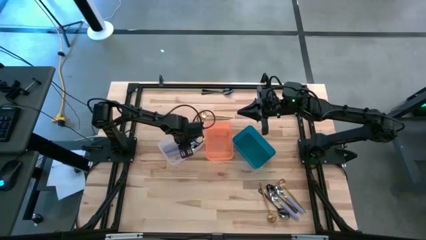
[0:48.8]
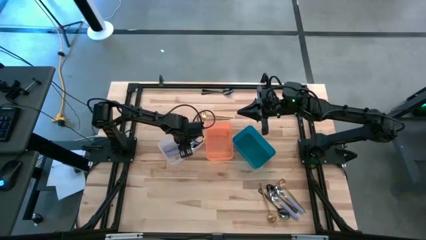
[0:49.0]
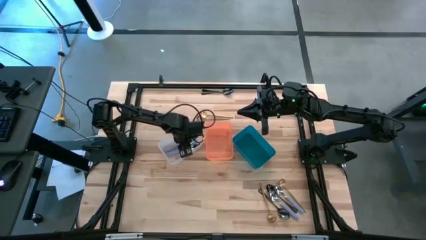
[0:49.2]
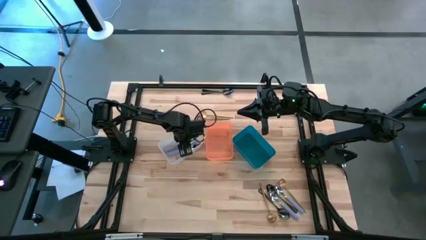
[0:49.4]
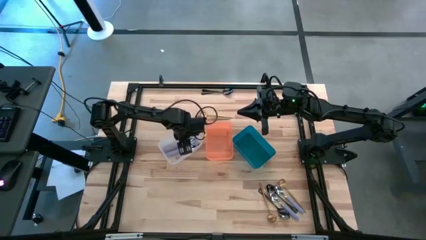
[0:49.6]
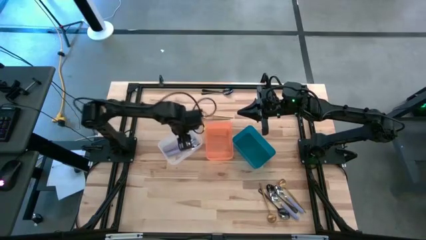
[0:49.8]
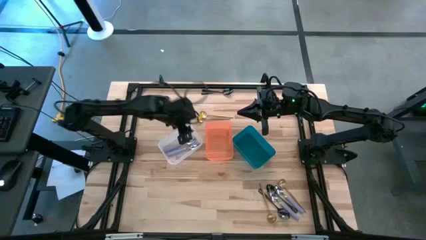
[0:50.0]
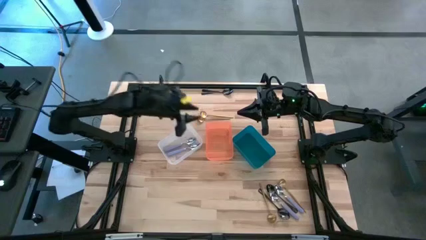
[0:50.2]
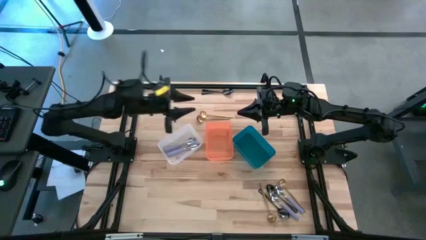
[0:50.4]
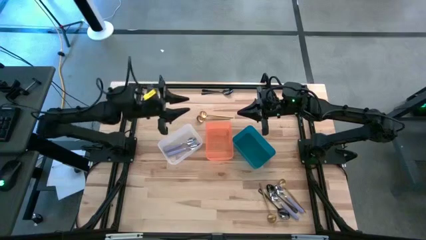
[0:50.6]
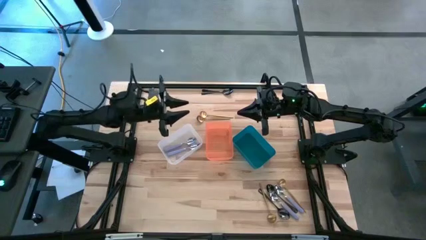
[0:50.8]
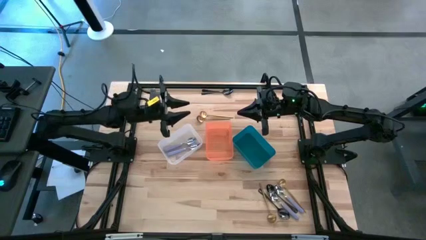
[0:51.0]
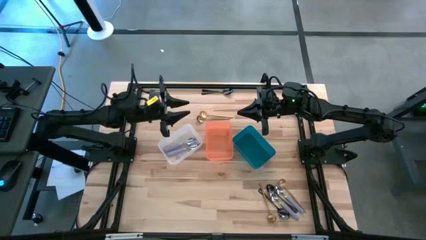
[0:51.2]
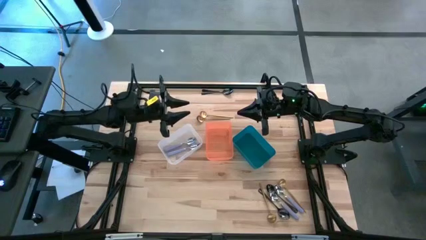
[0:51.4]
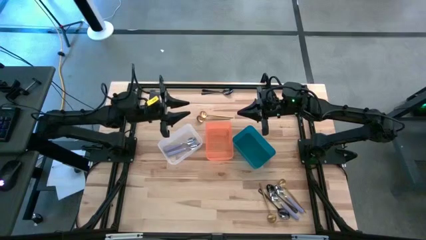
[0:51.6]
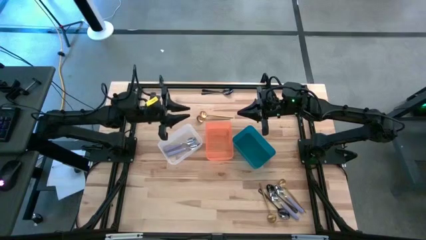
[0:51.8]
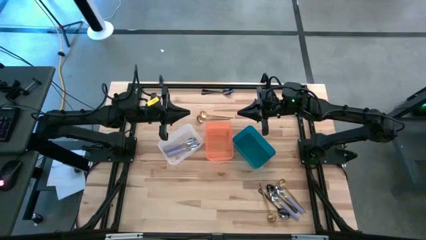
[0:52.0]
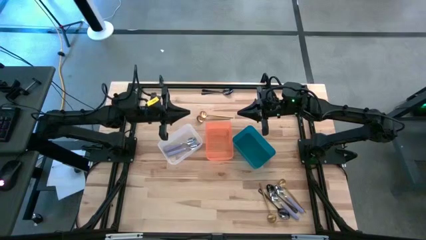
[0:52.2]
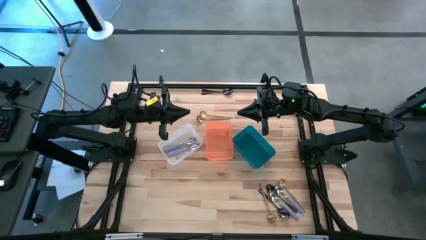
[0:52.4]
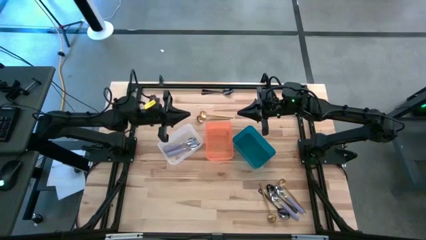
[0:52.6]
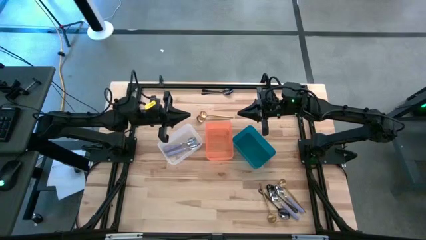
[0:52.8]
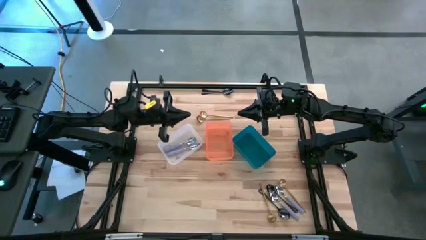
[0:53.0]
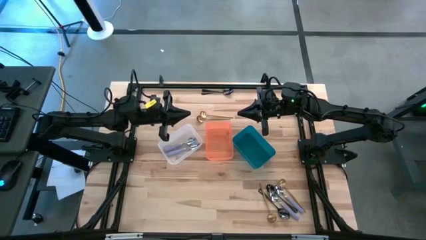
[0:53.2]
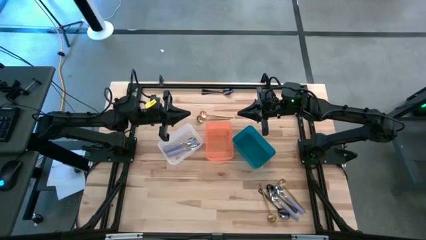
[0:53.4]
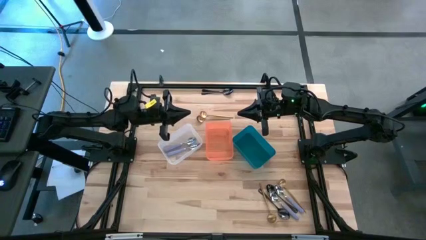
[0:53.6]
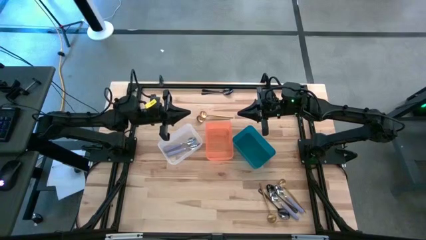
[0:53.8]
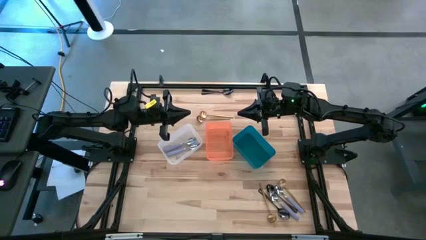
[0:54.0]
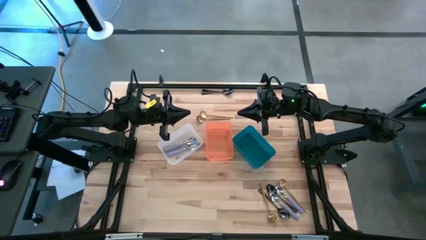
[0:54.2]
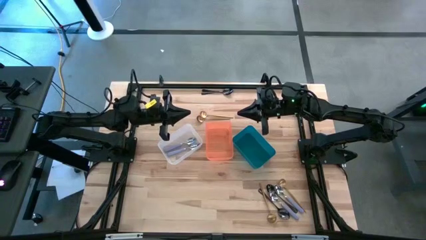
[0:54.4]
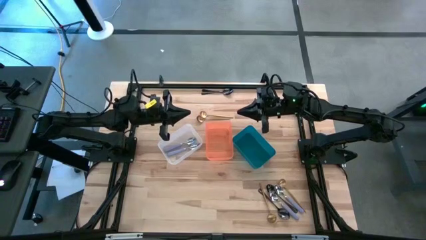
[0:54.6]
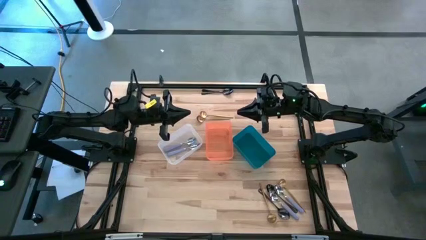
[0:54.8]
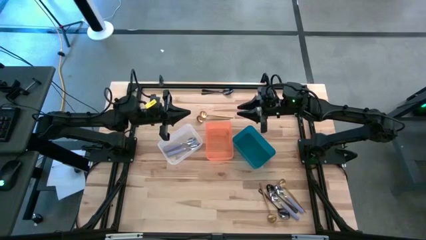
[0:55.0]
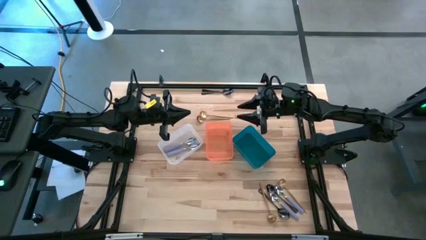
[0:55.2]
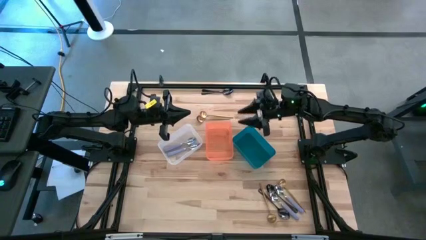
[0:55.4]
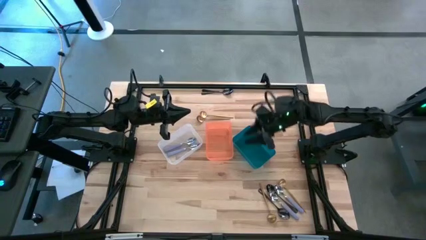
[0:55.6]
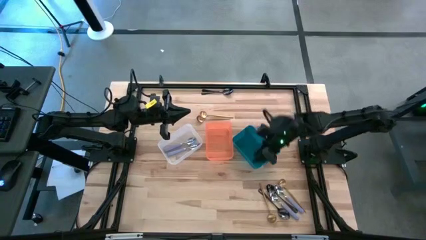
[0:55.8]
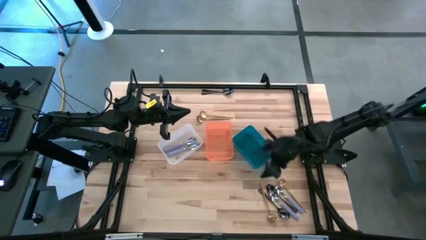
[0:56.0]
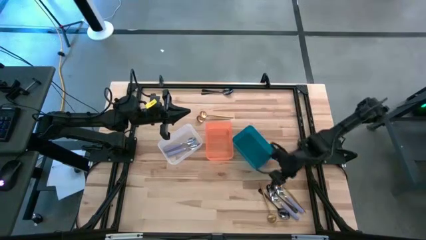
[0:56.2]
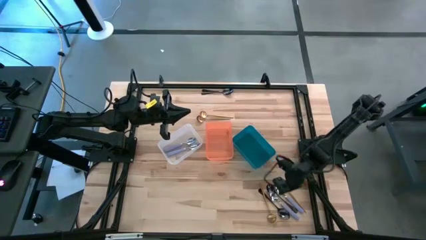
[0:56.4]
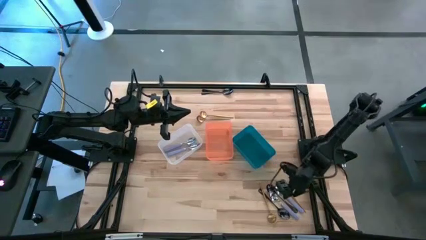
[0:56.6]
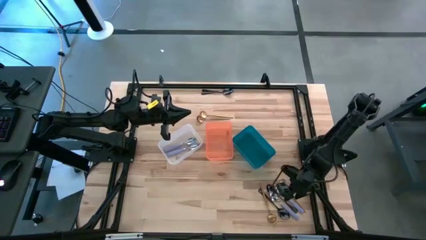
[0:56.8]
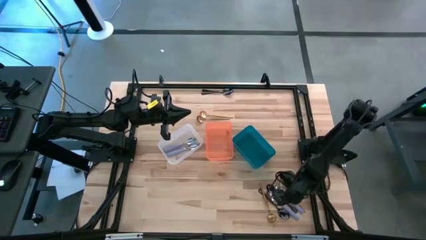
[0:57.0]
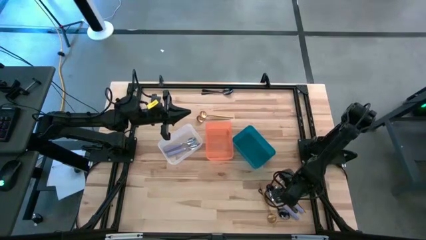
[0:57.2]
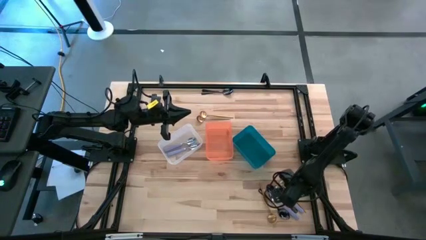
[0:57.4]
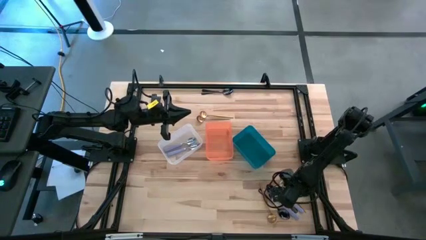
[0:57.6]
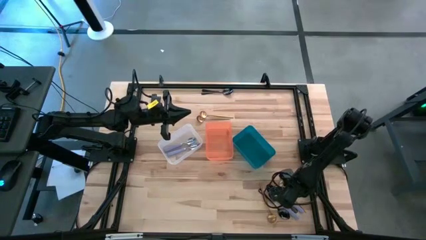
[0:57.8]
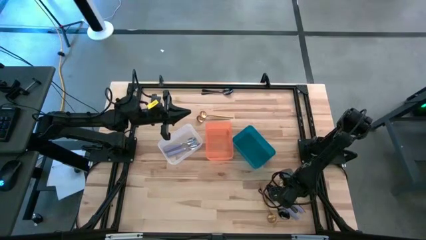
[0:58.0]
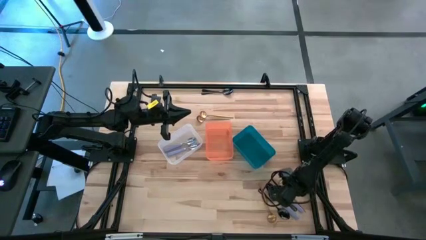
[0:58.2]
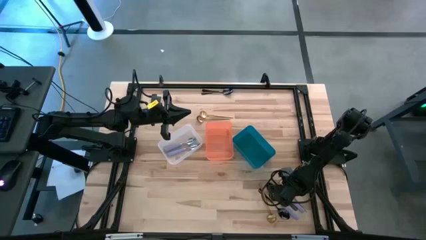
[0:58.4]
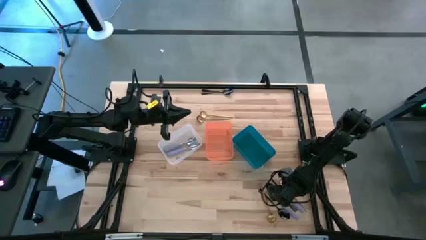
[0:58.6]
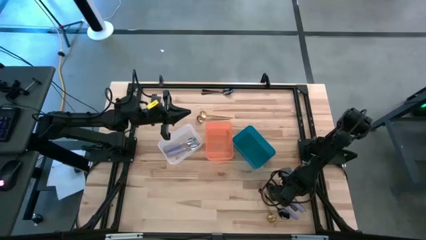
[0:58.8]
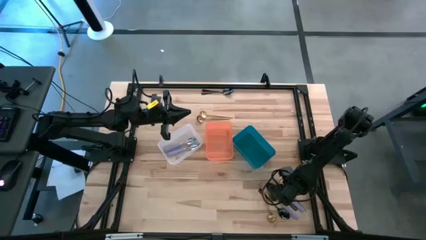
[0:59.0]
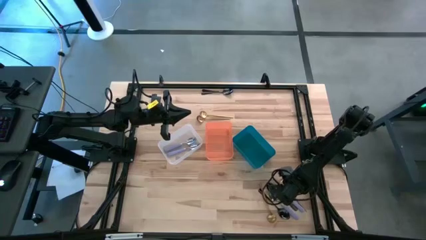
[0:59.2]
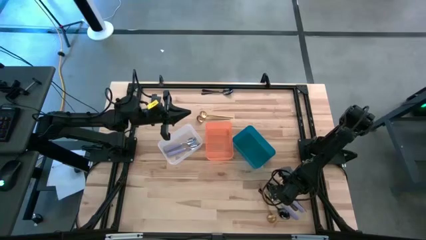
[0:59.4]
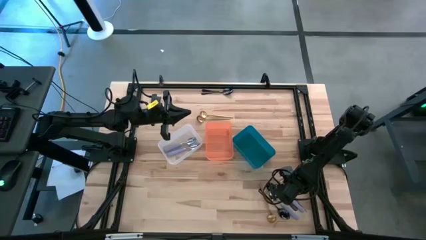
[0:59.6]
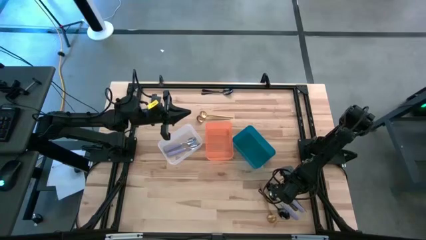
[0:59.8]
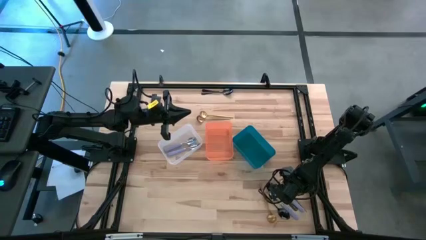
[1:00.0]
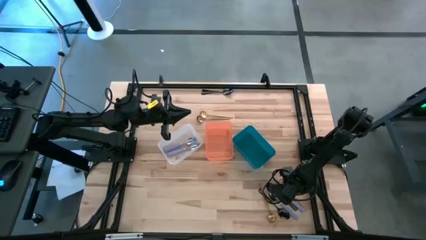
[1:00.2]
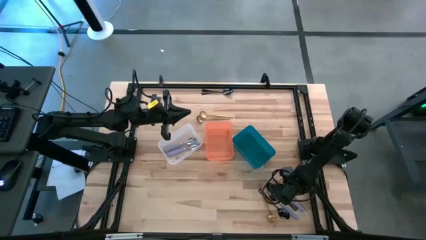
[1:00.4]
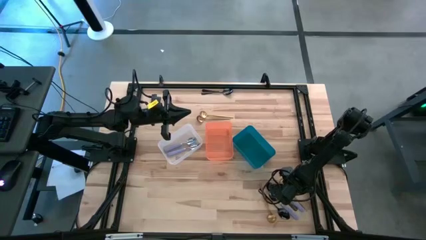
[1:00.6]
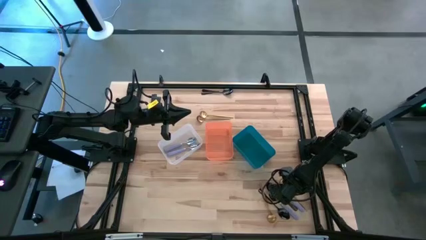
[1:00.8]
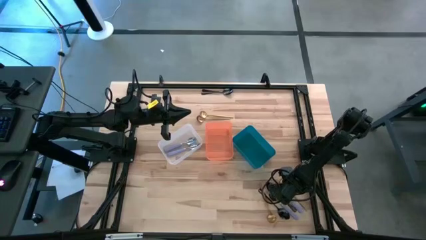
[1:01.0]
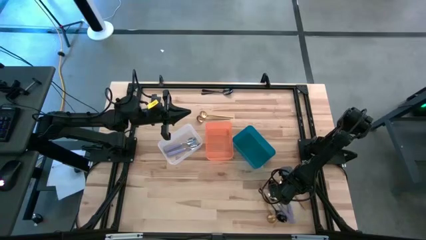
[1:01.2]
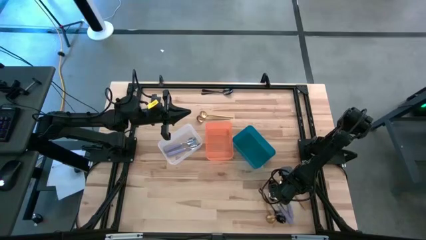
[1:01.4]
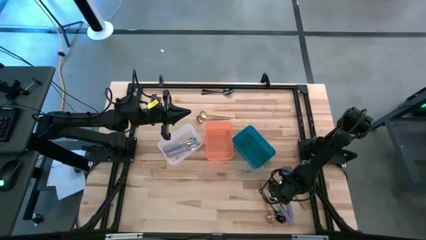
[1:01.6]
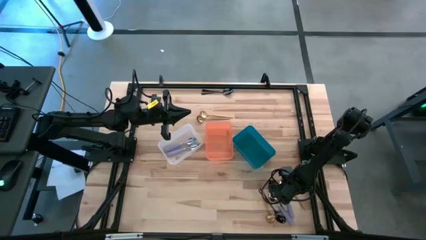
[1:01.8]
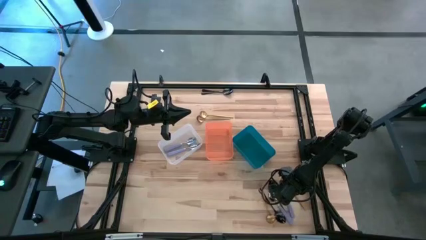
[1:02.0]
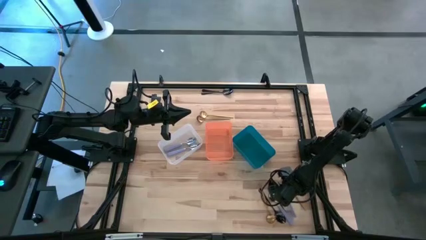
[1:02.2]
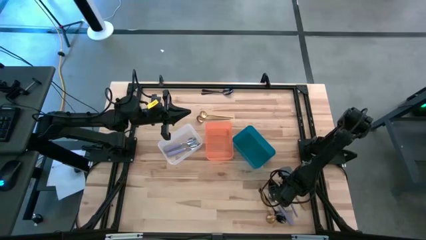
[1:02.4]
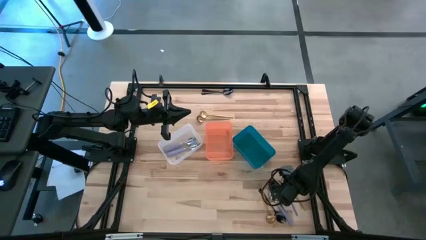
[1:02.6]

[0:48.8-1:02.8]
Task: Sort silverware by color (type)
Put the purple spoon into the white bin
